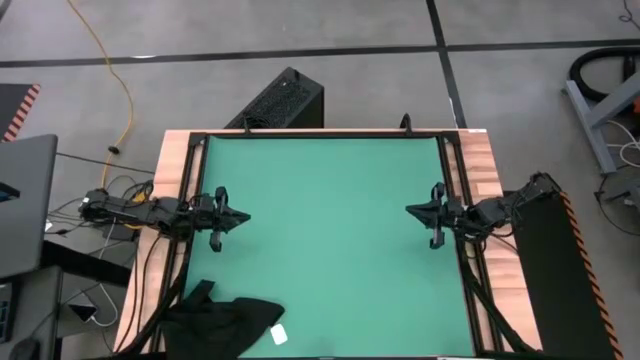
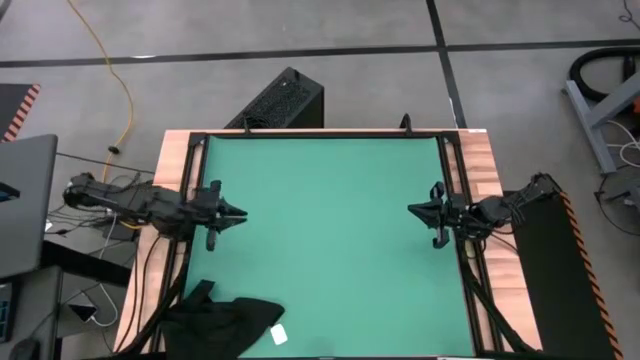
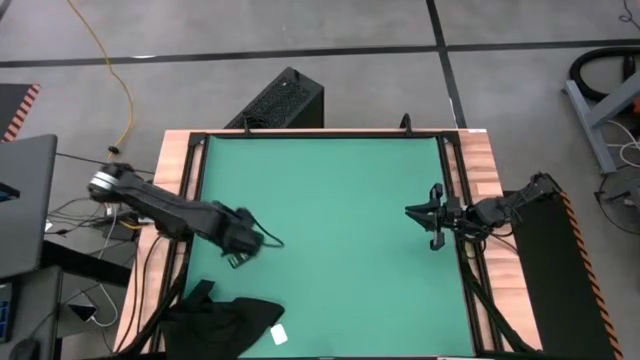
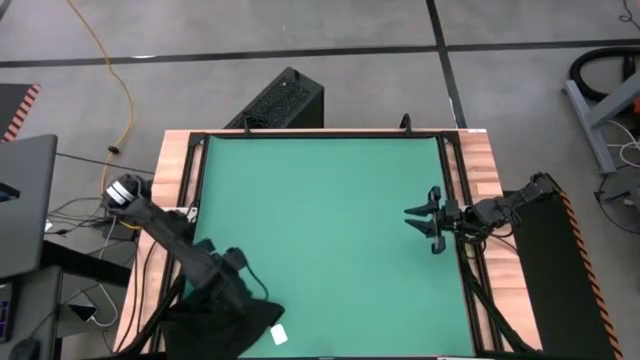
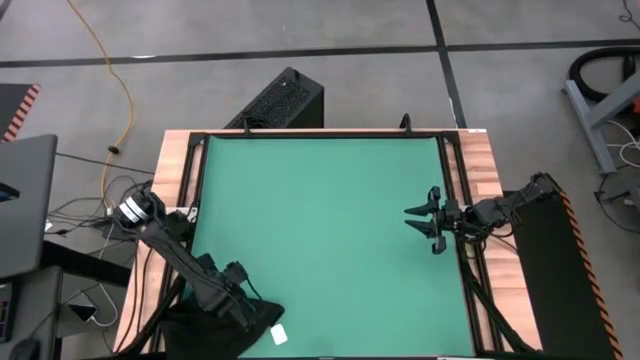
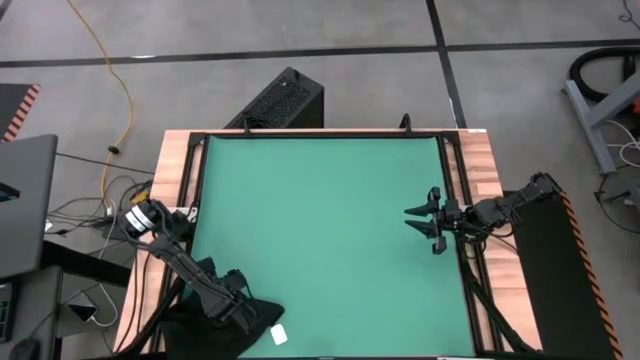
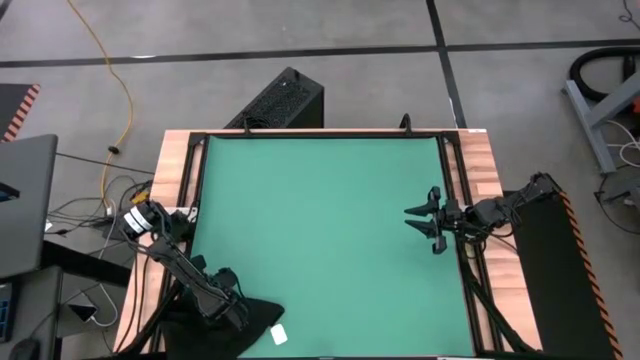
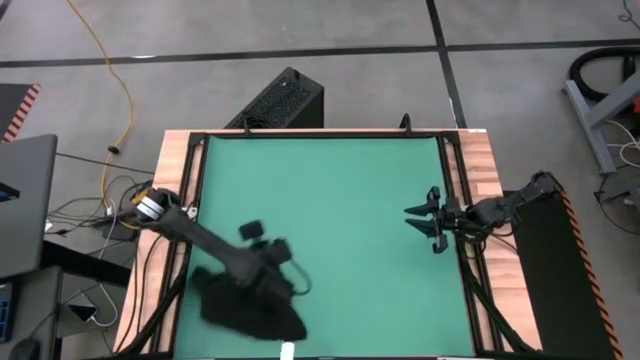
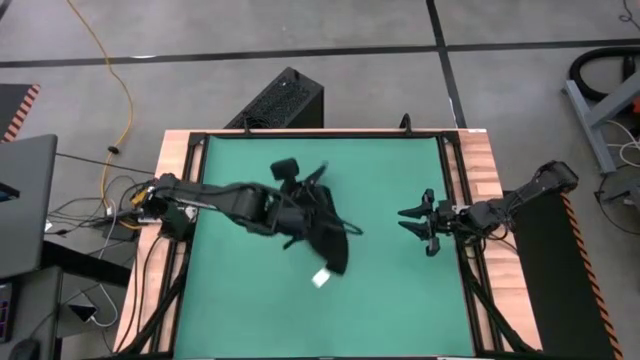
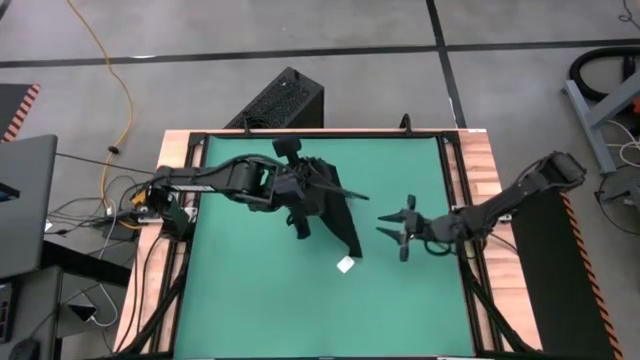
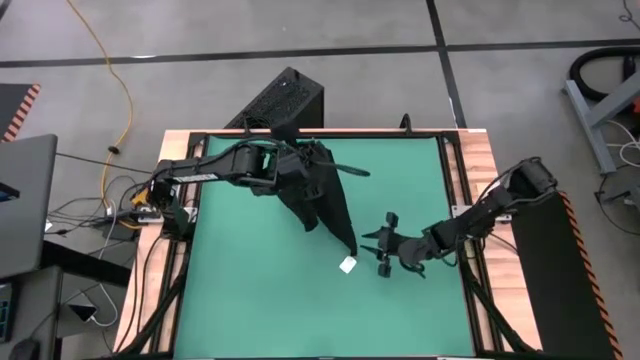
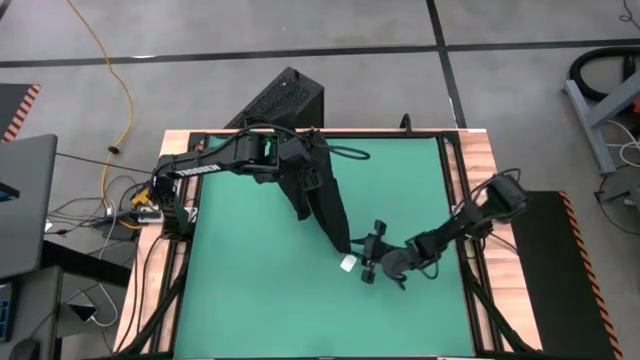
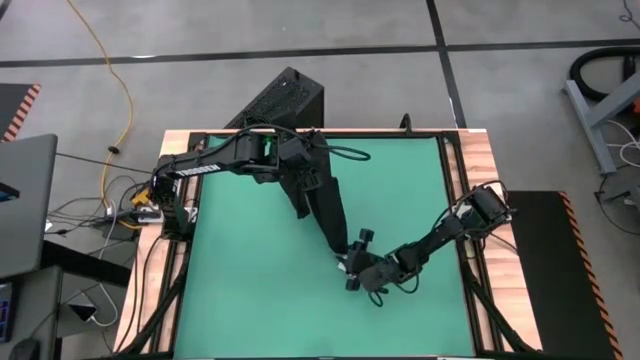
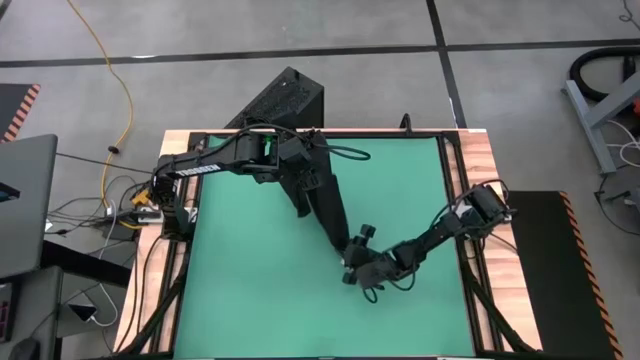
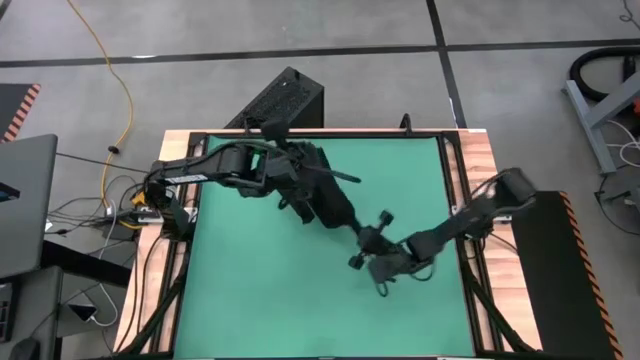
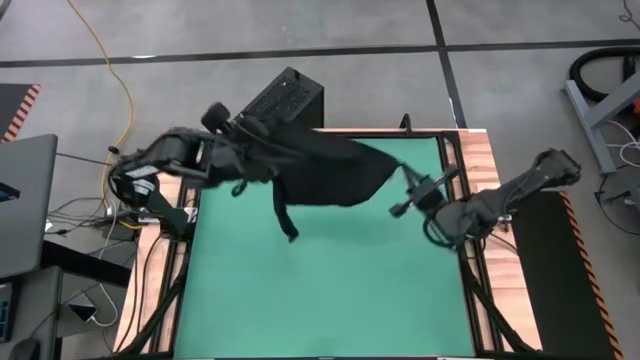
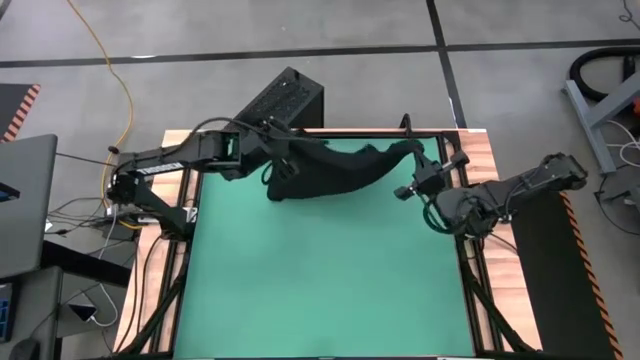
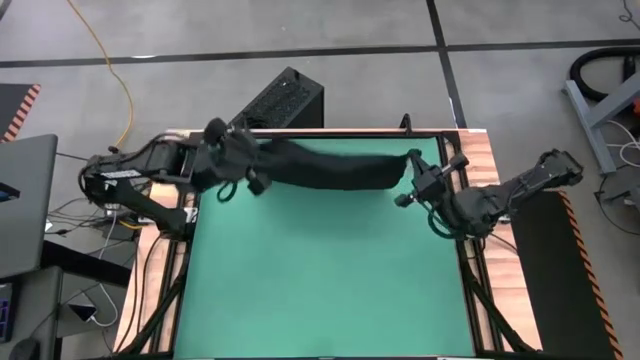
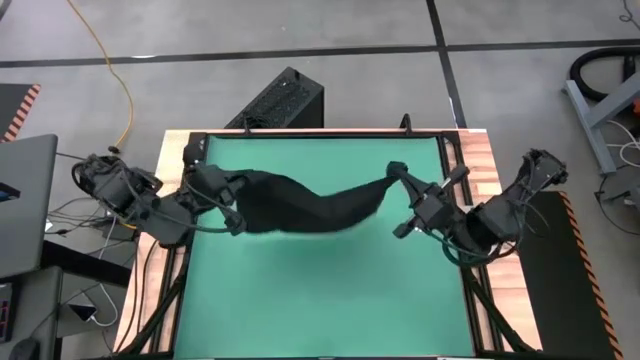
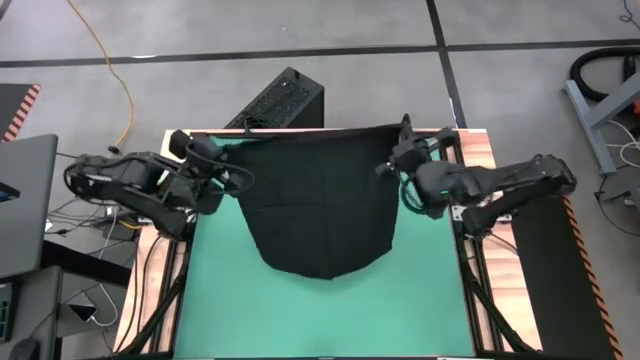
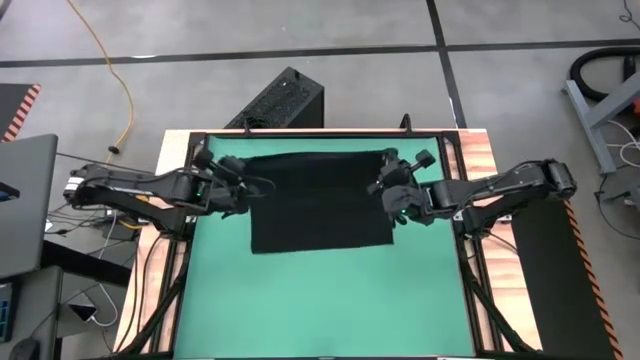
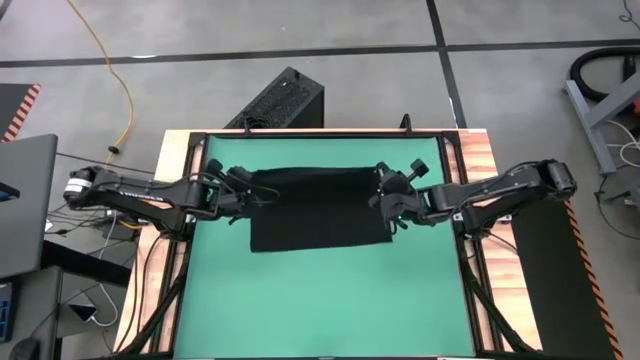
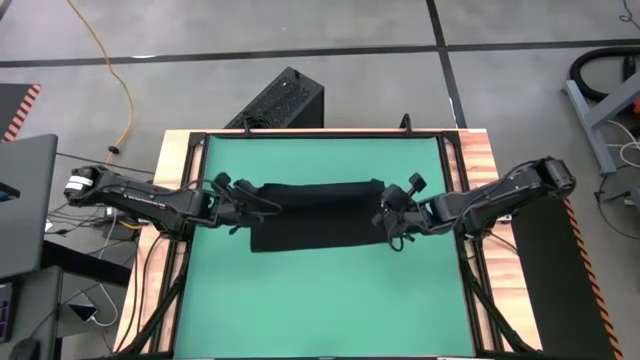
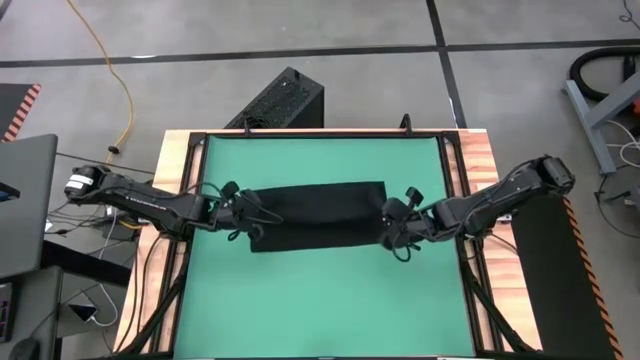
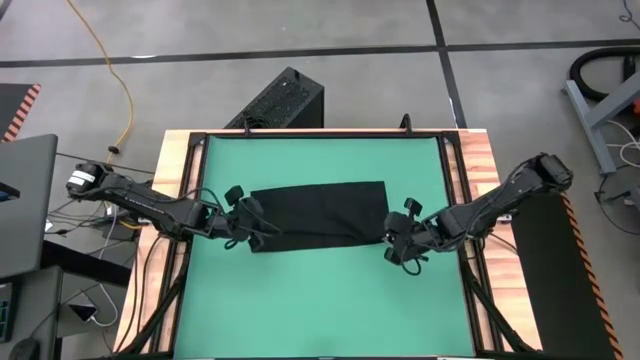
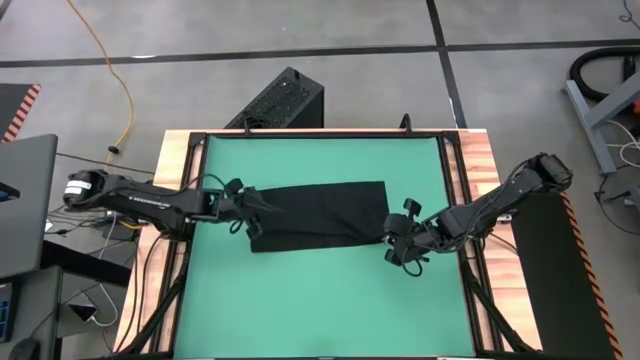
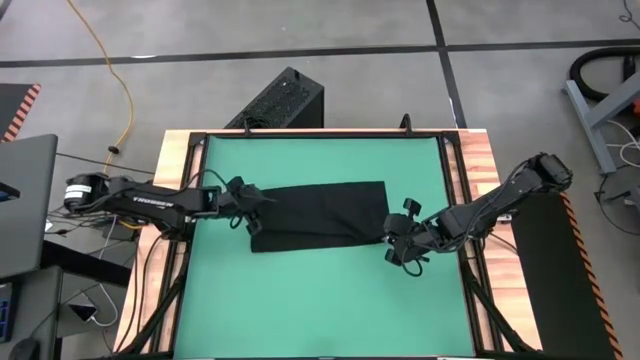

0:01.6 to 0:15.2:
Task: Roll towel
Roll the black towel
